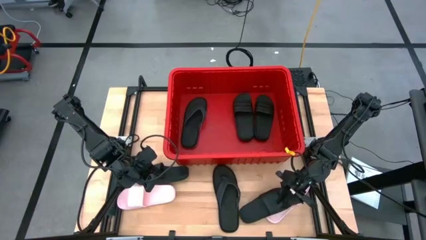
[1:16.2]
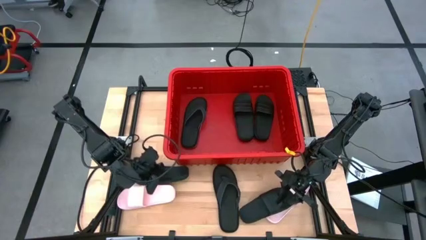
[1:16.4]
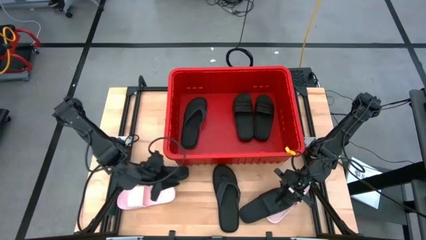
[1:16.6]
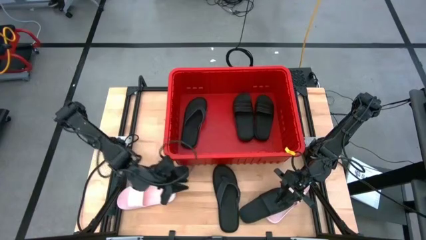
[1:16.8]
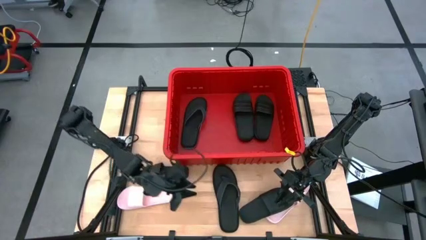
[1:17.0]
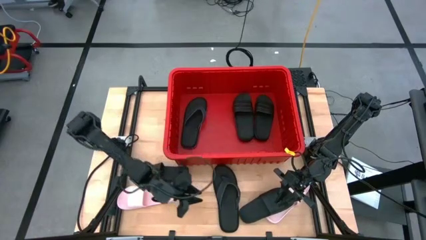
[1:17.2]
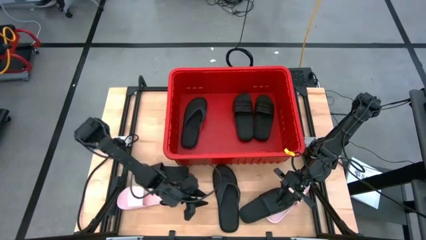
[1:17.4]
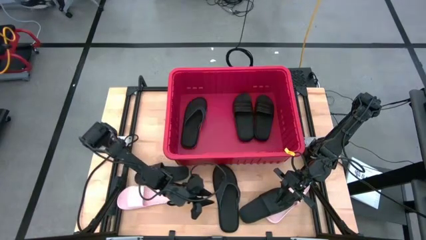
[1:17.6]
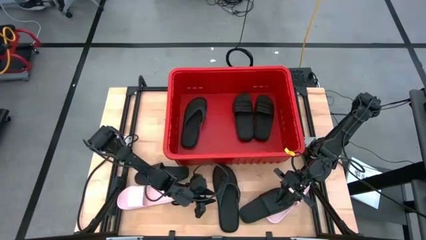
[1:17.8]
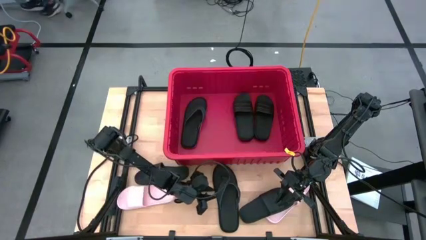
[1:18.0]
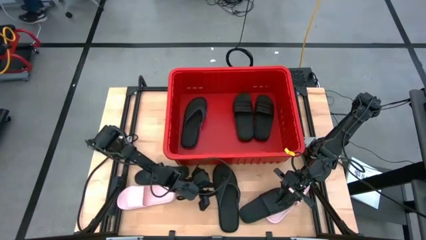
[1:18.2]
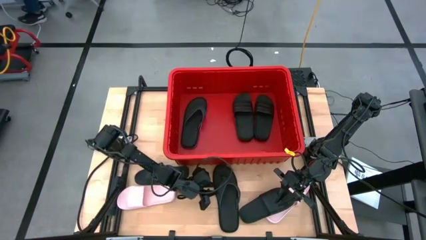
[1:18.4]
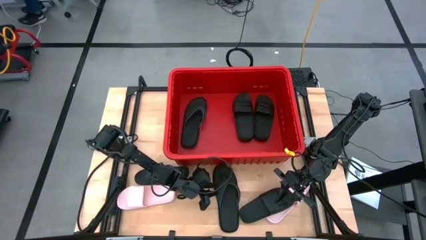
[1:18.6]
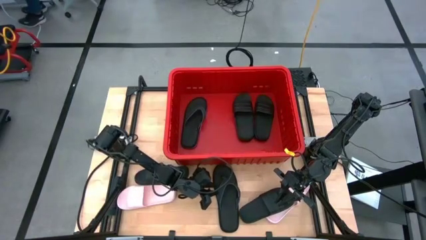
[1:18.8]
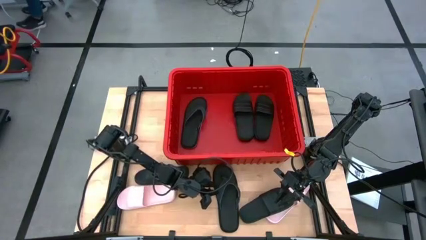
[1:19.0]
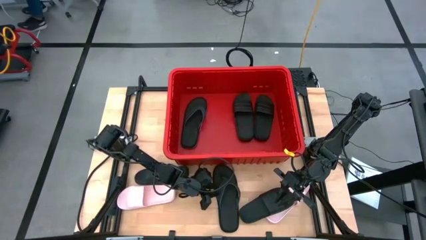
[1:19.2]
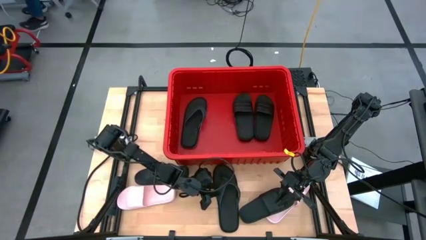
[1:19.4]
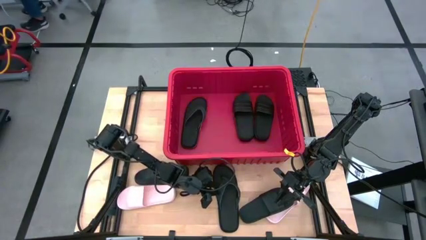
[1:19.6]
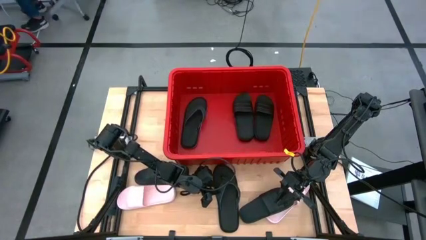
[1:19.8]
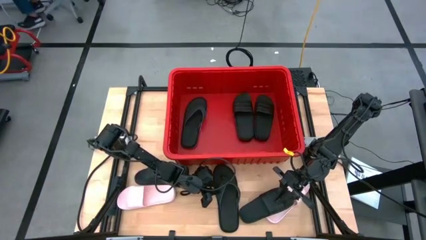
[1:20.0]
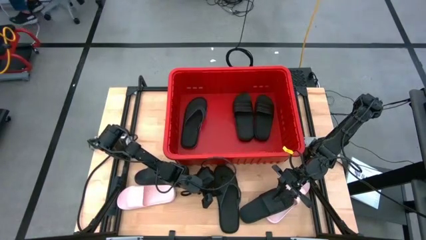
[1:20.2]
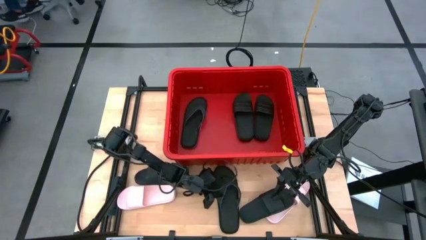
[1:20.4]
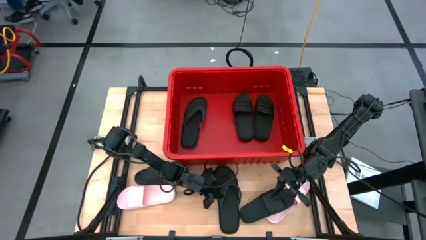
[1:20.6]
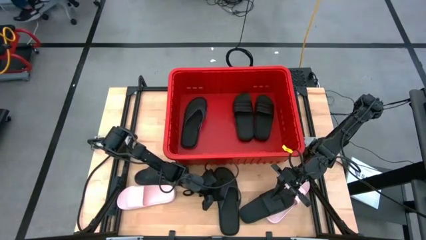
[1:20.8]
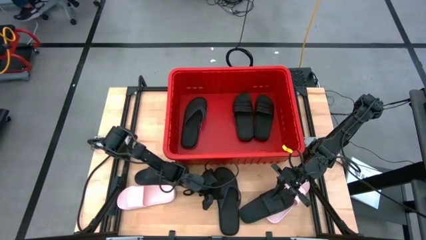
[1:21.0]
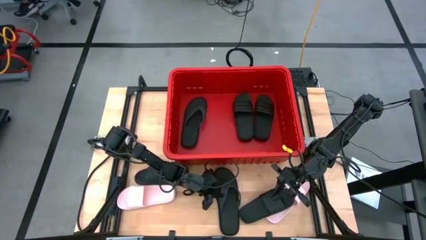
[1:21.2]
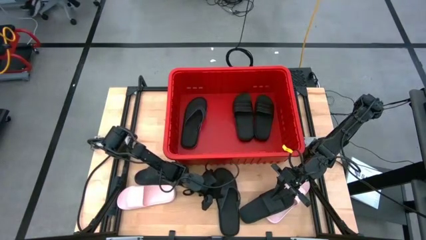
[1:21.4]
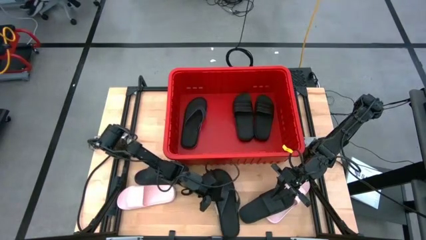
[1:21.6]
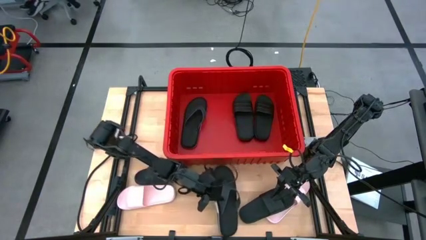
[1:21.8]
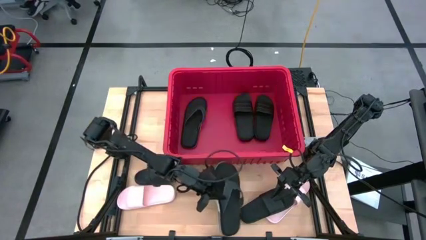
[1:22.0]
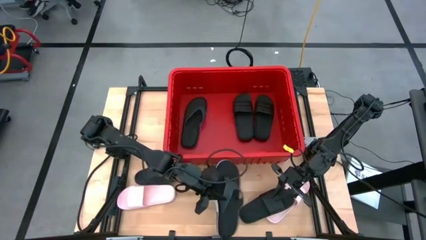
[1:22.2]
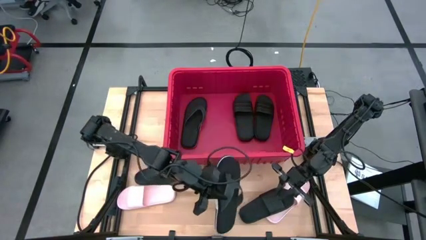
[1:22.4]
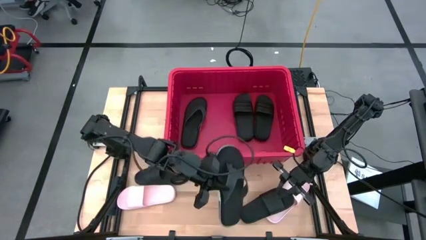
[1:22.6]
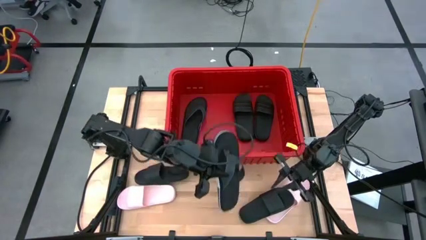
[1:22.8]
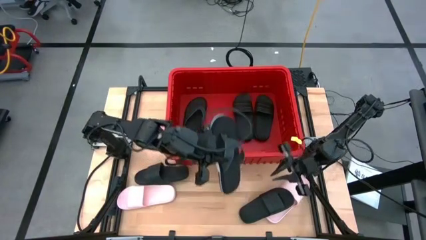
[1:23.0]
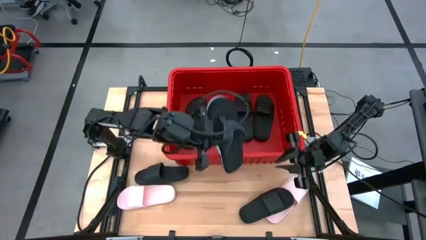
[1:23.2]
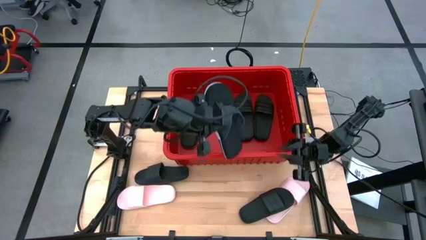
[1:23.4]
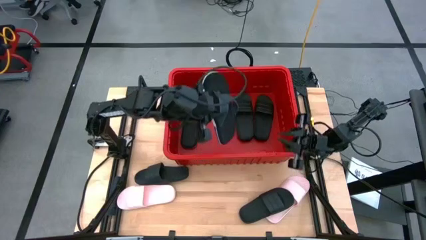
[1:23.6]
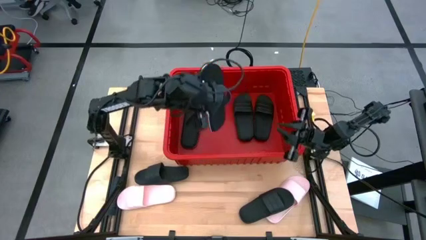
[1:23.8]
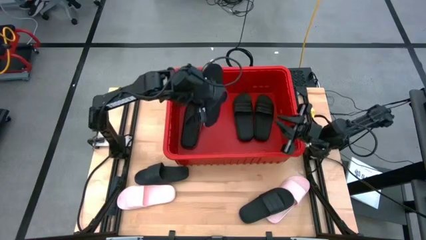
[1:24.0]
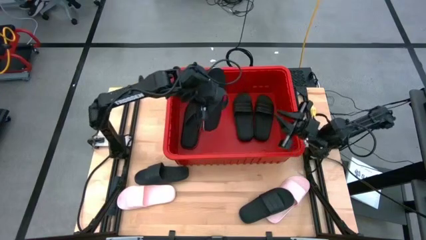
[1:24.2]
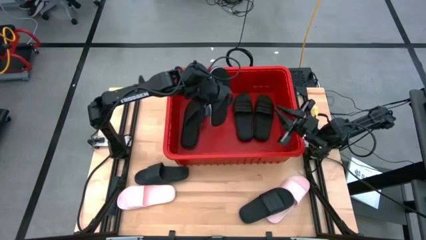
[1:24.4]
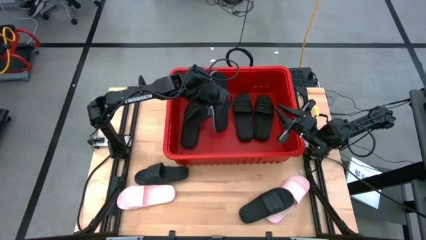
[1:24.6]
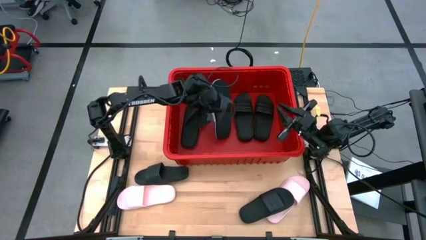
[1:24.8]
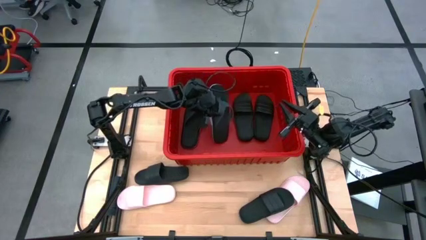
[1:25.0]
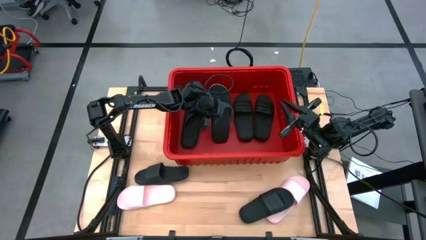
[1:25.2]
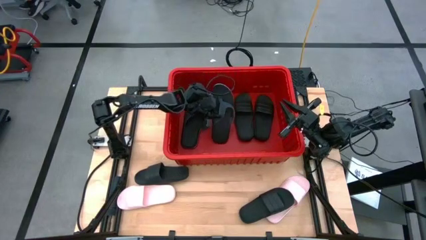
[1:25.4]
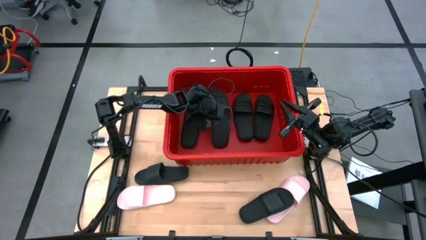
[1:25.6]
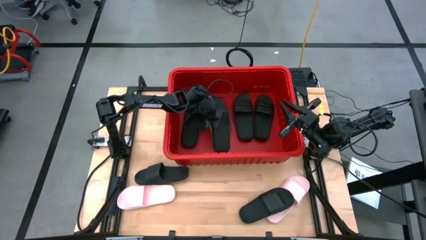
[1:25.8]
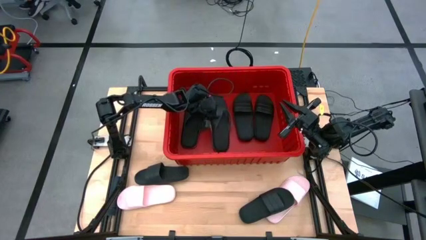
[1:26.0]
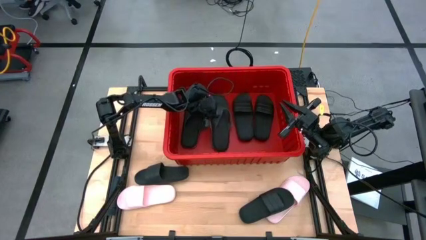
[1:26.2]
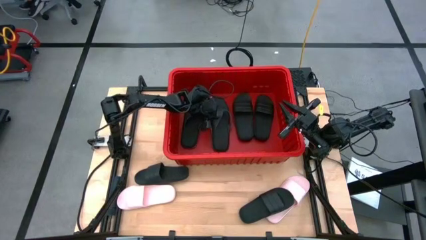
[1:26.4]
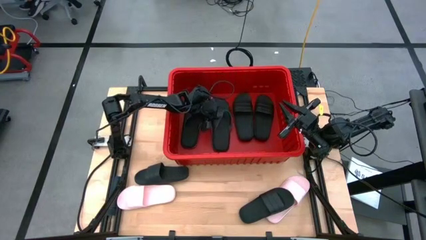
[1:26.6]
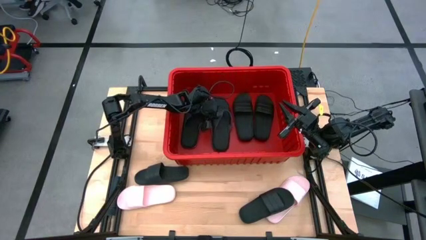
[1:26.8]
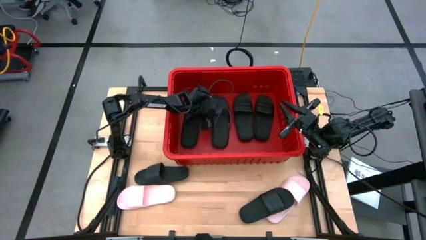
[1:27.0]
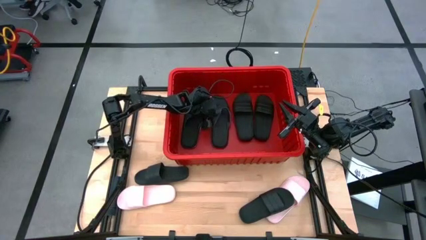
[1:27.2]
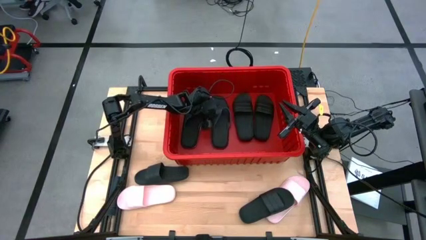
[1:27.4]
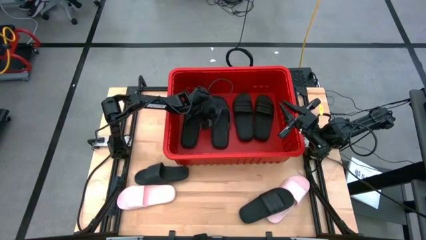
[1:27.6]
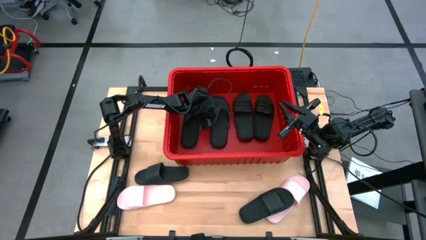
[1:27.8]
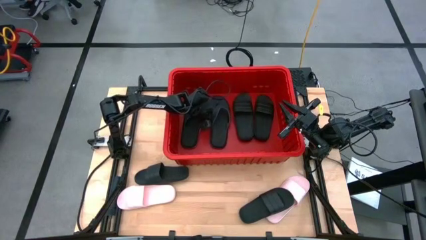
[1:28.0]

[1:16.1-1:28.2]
Task: Pick and place slides into bin
Put the black slipper into the red bin

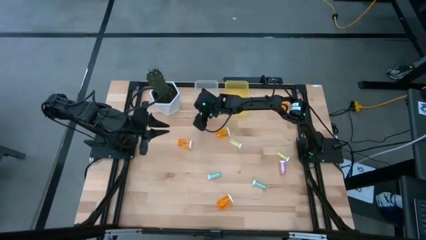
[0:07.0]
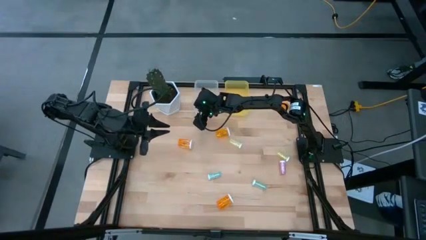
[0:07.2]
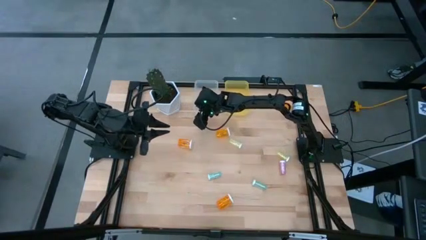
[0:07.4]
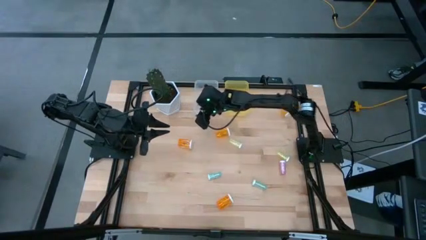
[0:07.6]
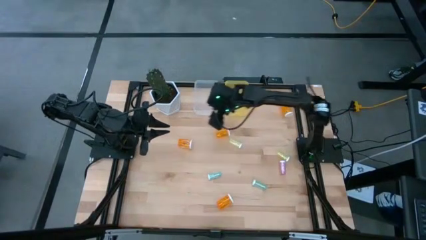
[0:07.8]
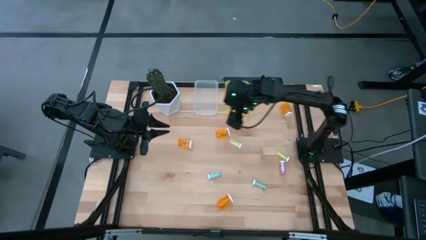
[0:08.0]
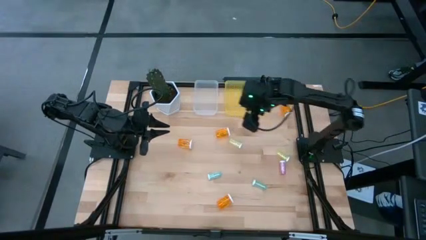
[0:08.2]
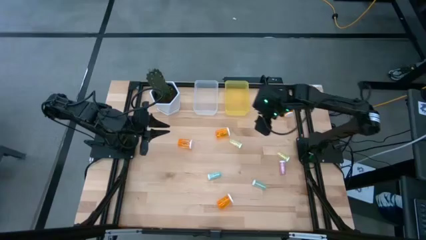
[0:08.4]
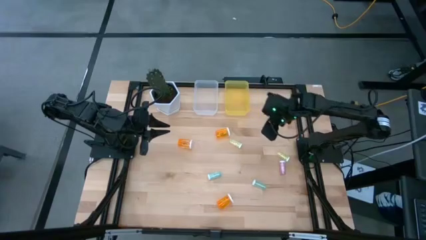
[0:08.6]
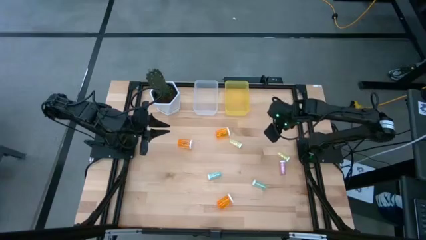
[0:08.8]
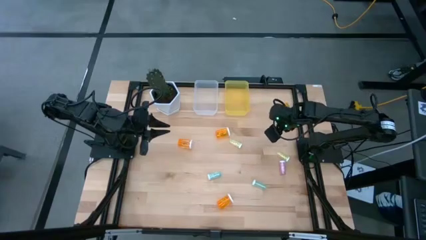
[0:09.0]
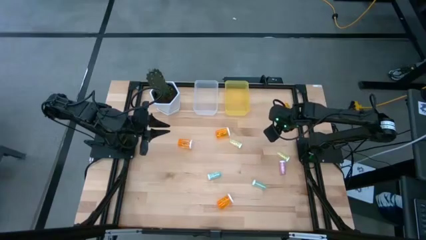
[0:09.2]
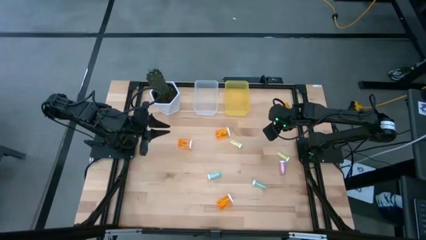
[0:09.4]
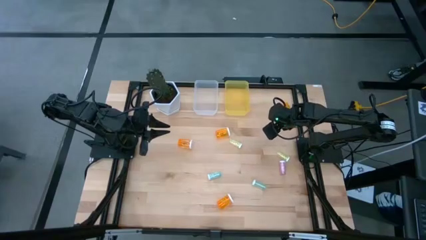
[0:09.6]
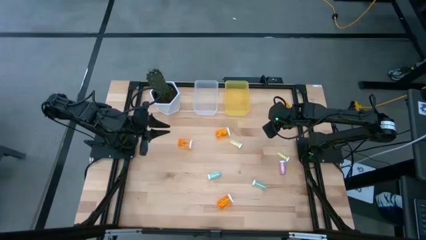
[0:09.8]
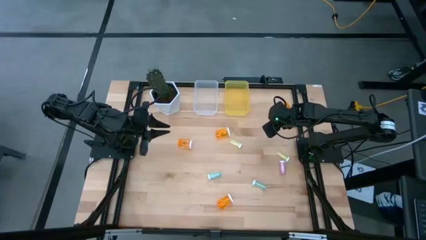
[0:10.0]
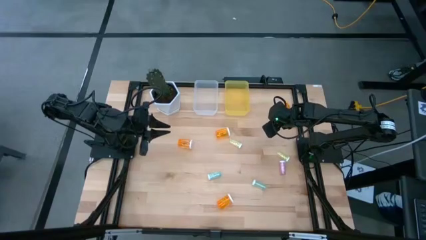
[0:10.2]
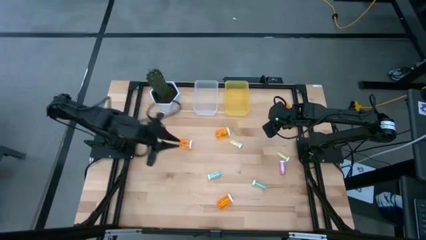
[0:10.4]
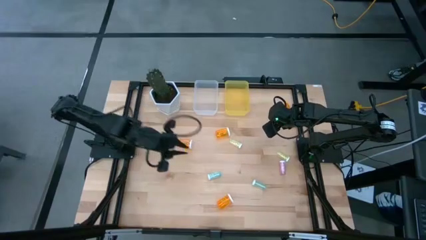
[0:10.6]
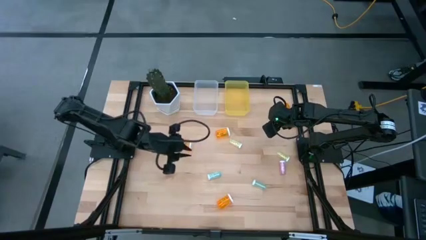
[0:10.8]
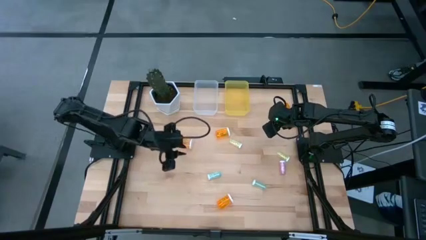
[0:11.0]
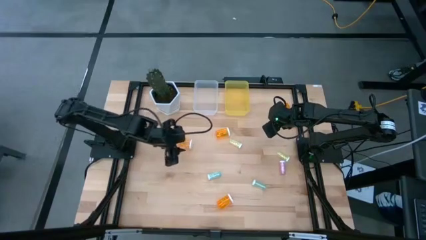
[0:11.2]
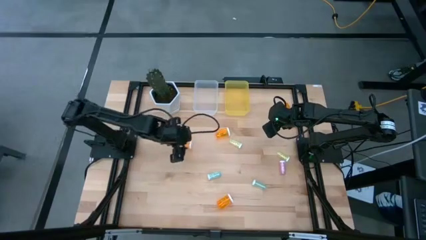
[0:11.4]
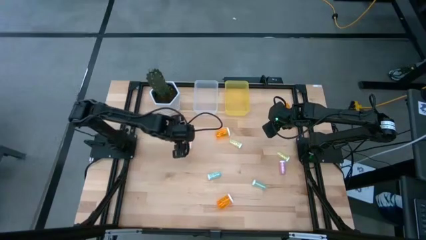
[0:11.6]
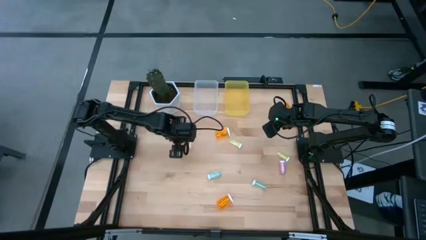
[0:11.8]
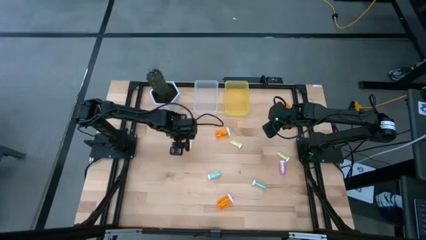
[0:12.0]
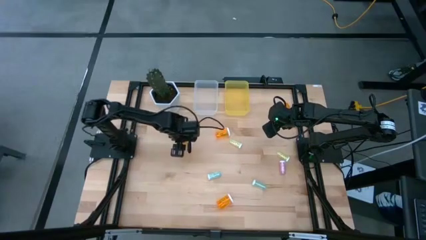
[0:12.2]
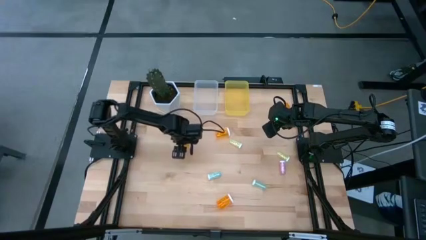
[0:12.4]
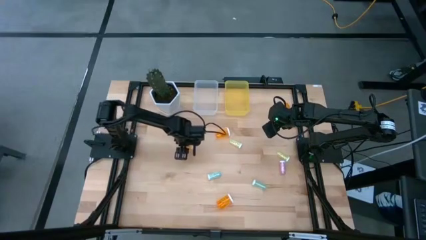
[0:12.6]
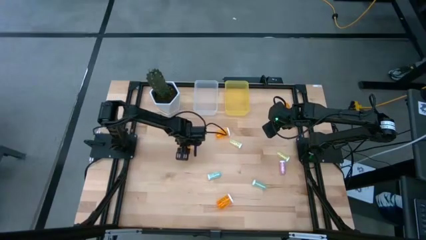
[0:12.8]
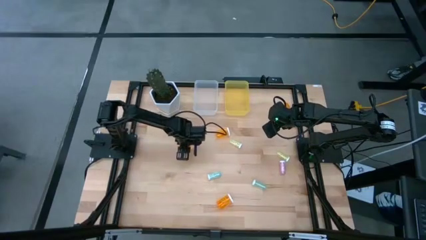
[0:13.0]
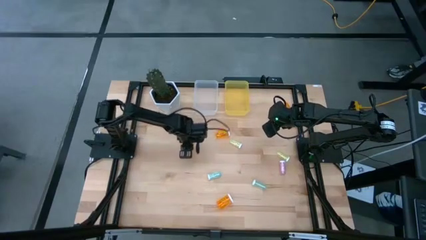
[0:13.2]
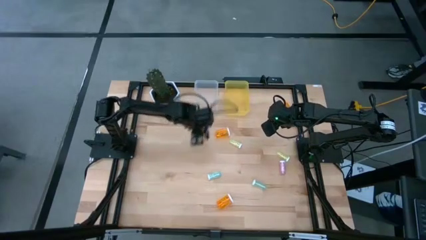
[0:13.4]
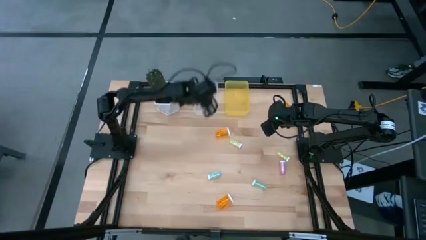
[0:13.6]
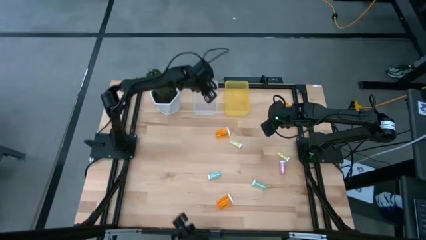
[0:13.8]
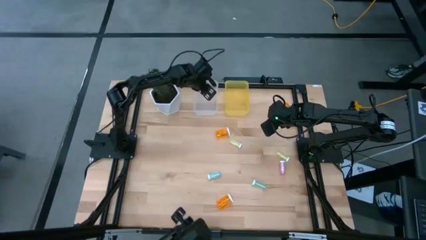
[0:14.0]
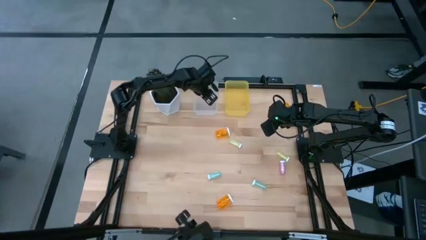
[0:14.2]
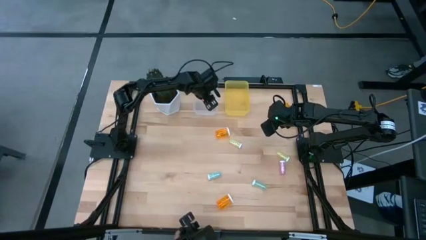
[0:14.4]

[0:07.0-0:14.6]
Task: Pick and place medicine bottles into bin by pill shape (circle, oval)
Put the left orange pill bottle into the white bin
